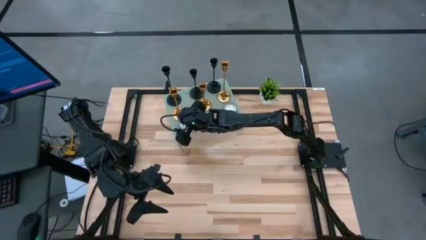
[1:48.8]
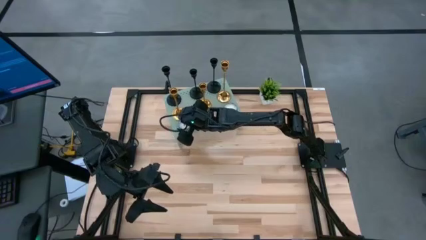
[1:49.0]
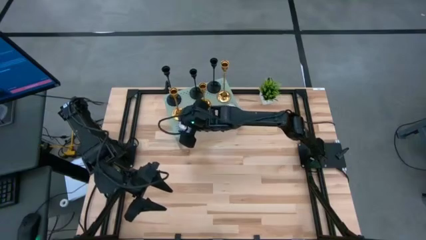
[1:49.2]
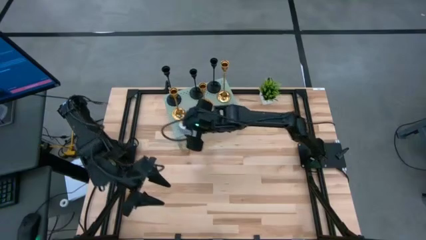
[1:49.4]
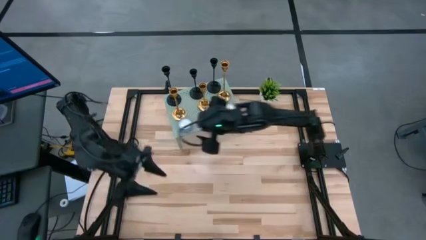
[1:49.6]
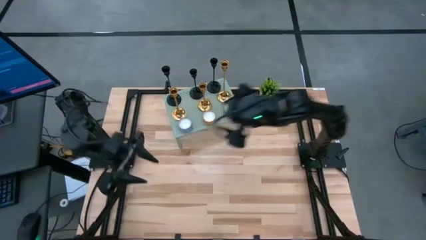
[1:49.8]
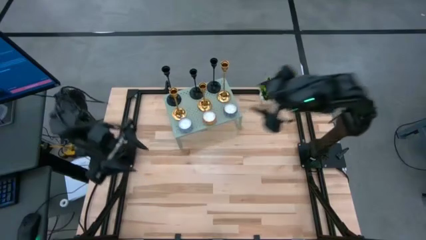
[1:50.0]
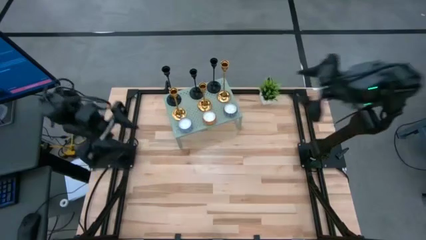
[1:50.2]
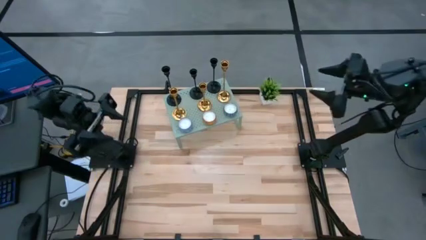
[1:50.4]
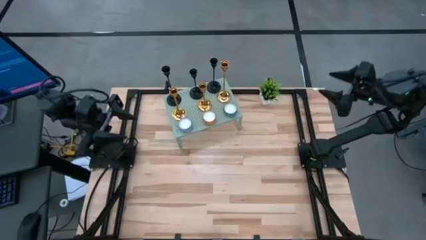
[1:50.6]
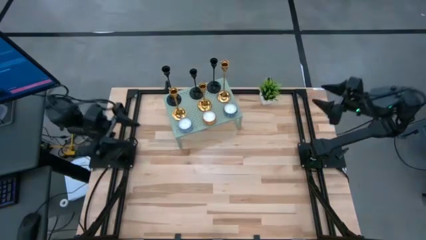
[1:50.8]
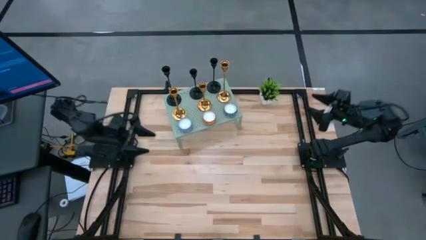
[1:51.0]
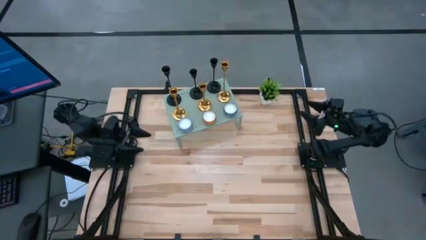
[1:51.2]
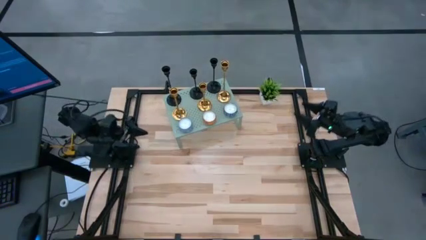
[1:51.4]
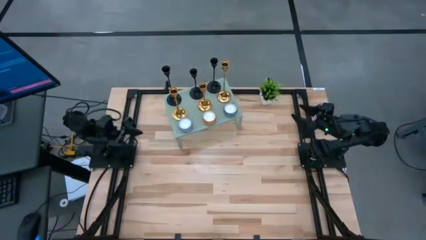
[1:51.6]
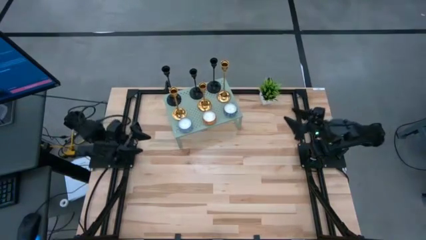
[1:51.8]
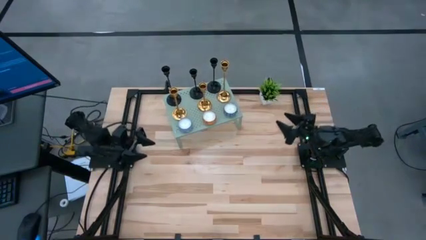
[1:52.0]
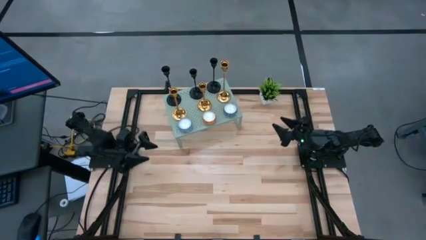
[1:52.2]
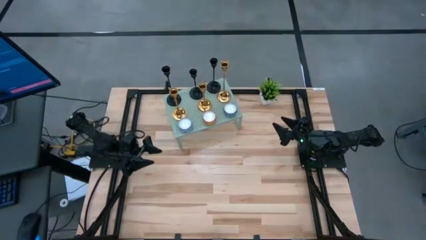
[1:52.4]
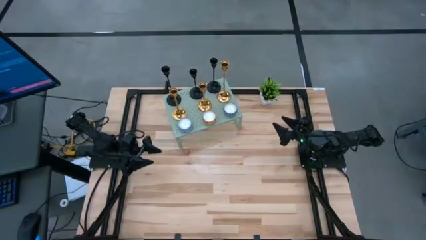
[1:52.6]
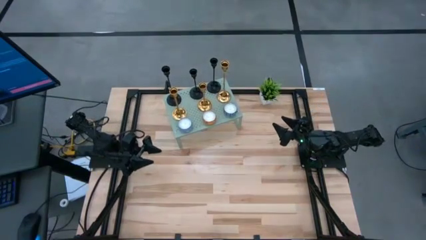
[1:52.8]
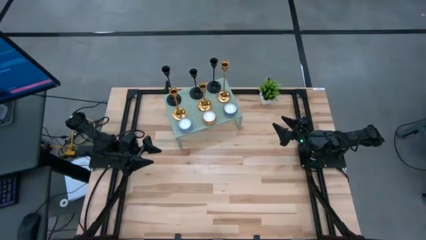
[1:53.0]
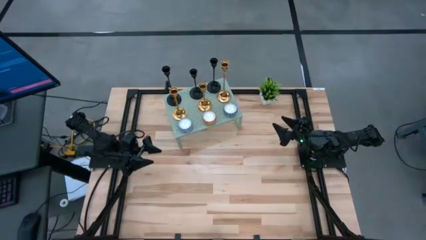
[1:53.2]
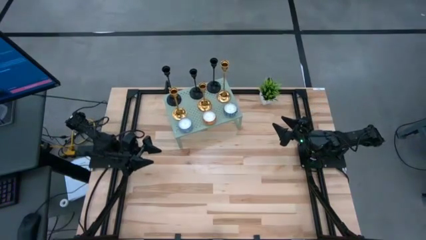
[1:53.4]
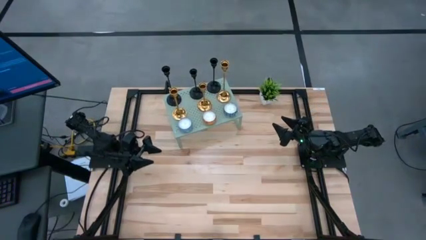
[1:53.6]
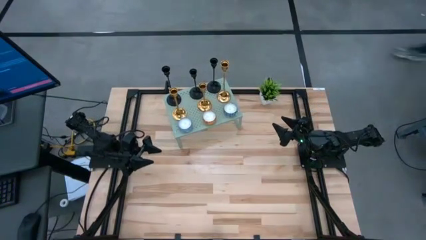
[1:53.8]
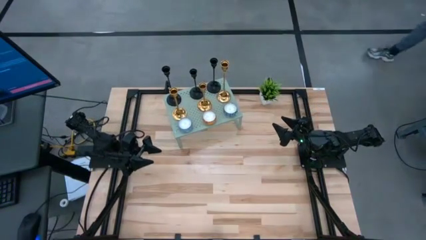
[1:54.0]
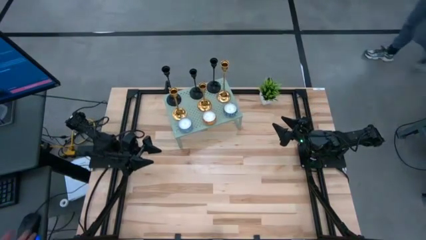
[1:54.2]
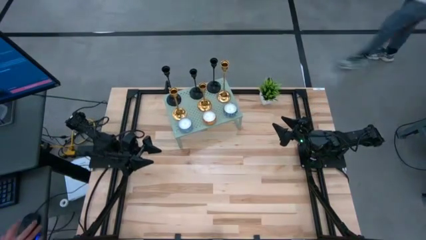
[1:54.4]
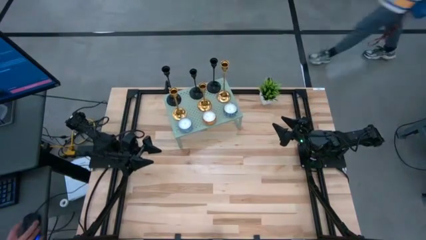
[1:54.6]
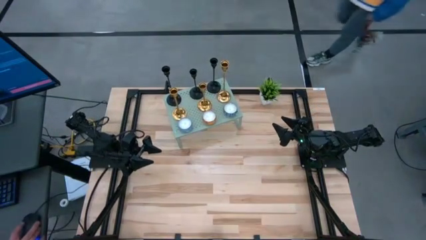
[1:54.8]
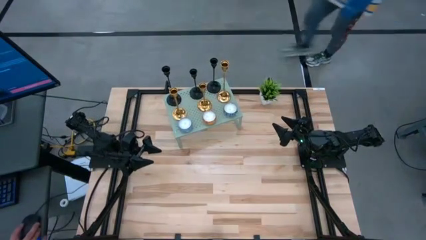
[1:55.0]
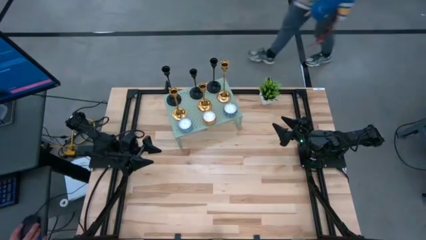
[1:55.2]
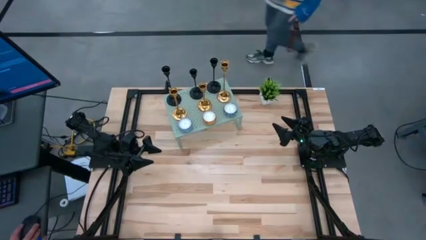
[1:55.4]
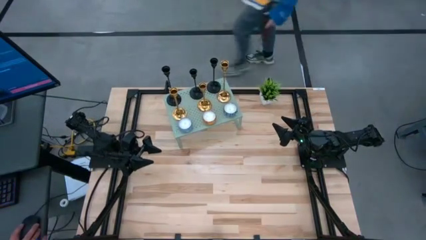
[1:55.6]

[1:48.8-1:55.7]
Task: Pick & Place candle stick holders
Return to Home Position

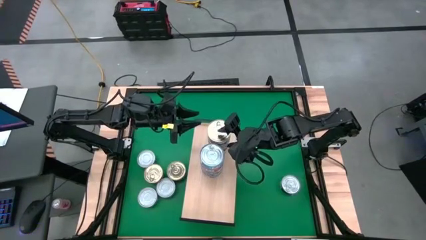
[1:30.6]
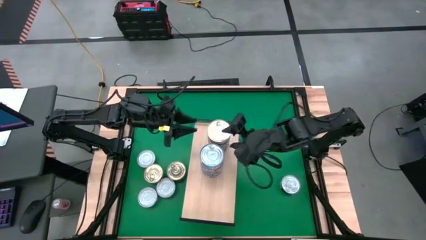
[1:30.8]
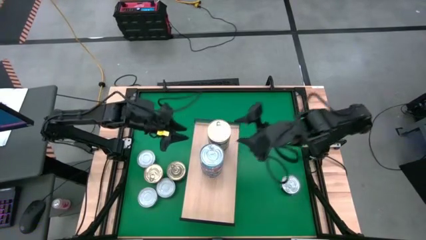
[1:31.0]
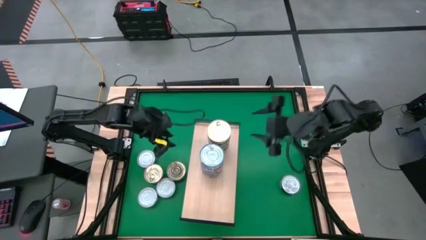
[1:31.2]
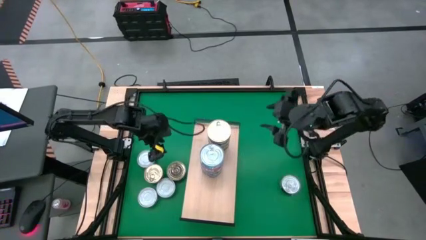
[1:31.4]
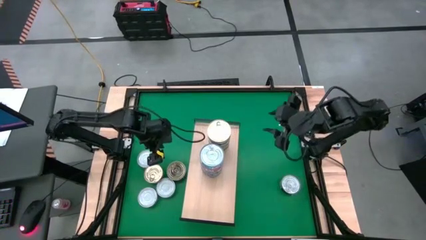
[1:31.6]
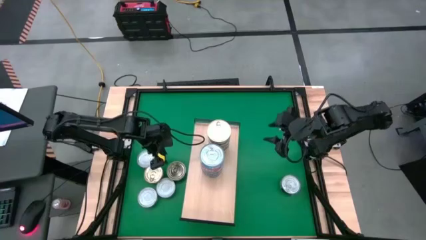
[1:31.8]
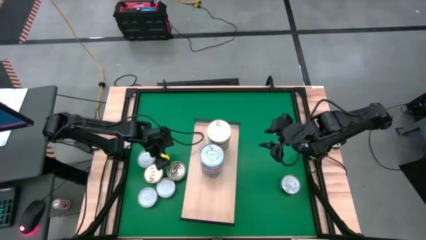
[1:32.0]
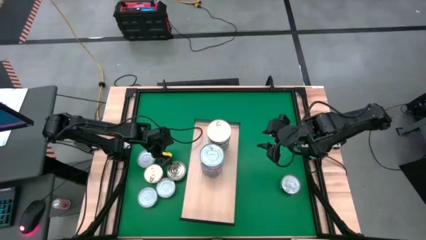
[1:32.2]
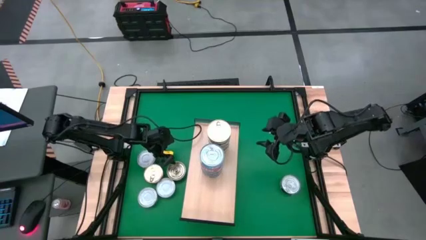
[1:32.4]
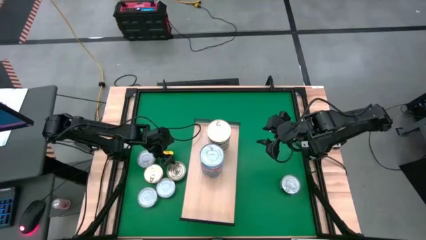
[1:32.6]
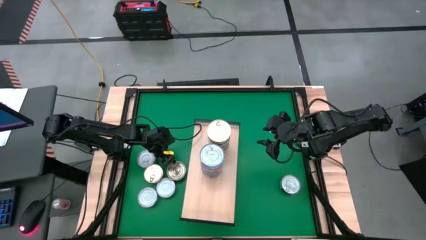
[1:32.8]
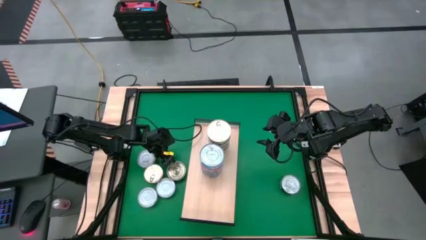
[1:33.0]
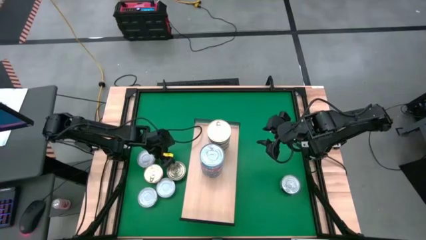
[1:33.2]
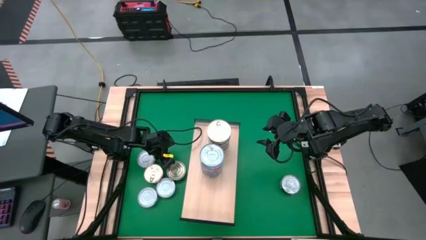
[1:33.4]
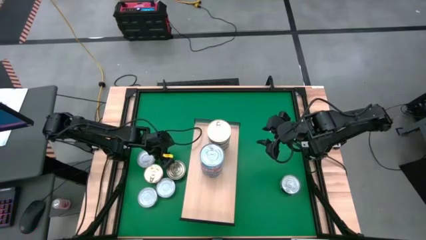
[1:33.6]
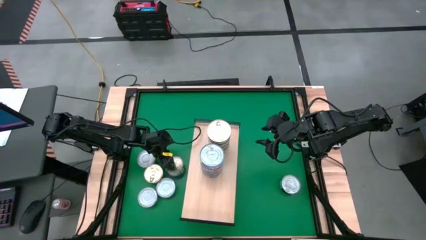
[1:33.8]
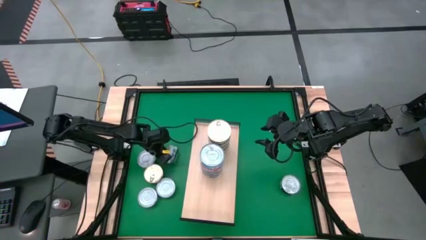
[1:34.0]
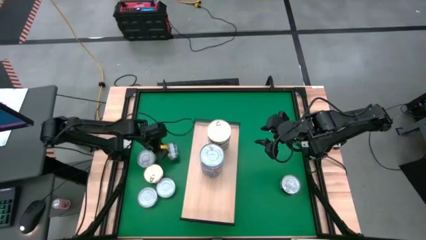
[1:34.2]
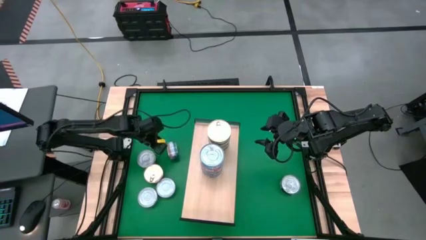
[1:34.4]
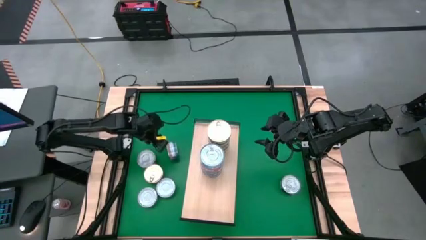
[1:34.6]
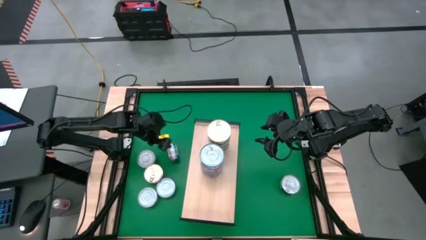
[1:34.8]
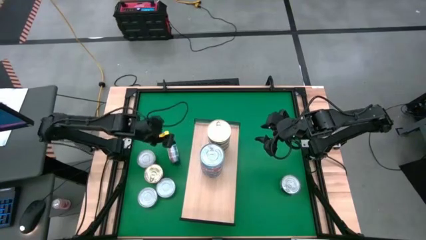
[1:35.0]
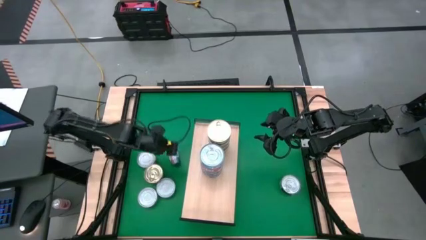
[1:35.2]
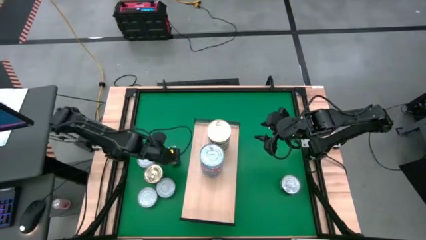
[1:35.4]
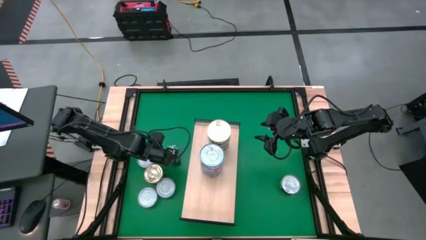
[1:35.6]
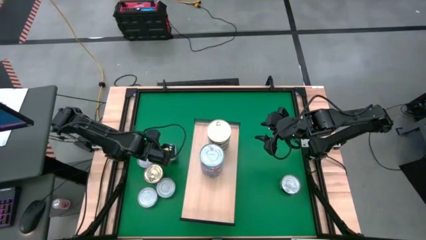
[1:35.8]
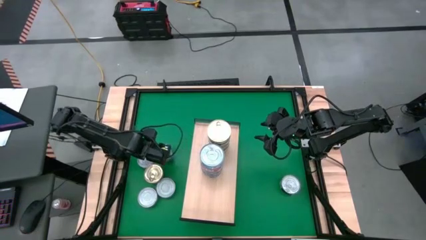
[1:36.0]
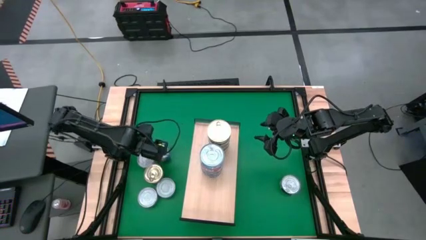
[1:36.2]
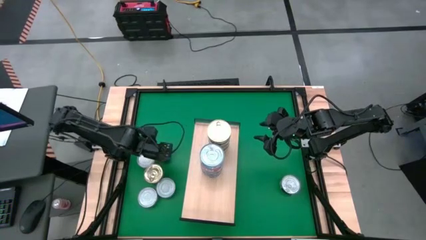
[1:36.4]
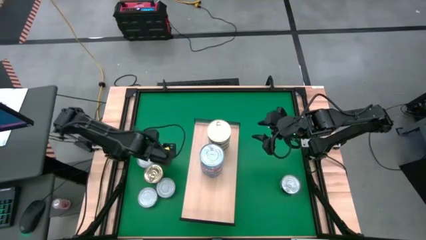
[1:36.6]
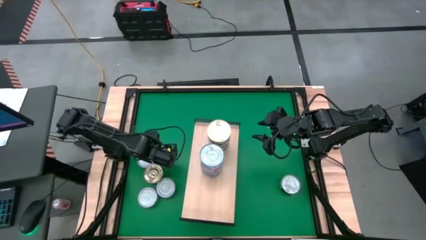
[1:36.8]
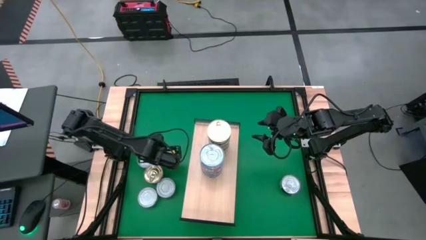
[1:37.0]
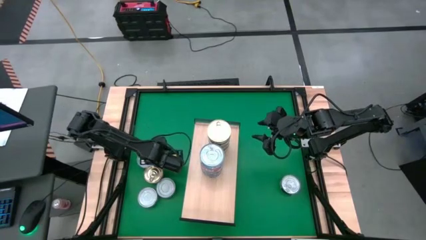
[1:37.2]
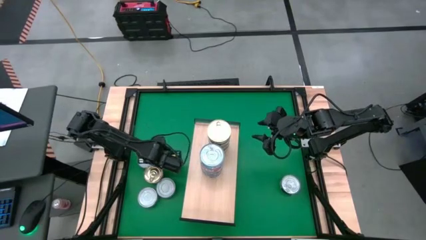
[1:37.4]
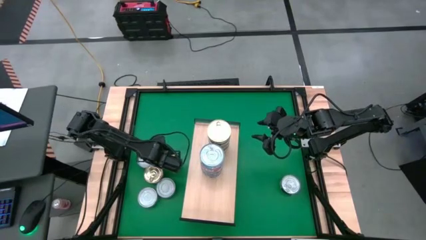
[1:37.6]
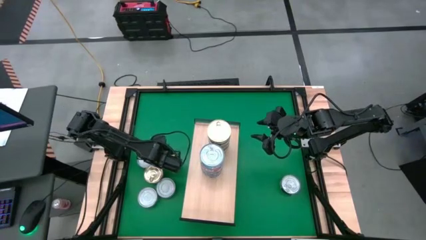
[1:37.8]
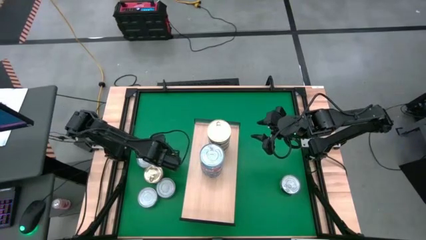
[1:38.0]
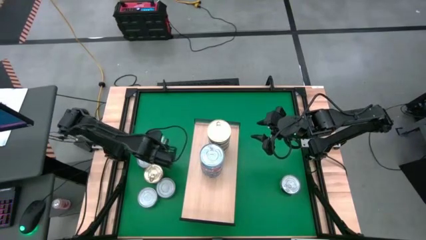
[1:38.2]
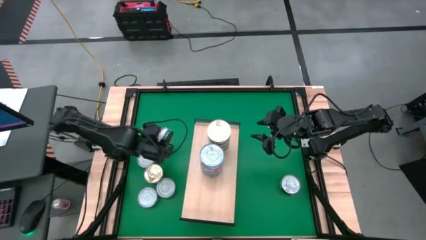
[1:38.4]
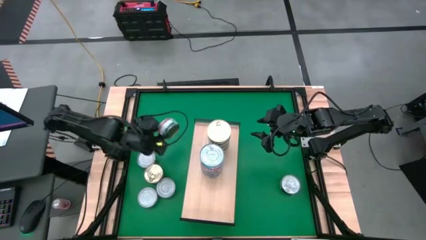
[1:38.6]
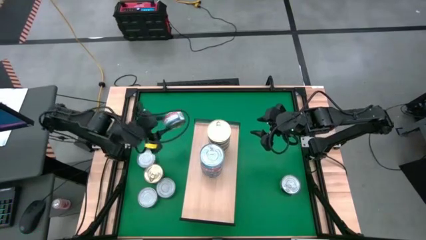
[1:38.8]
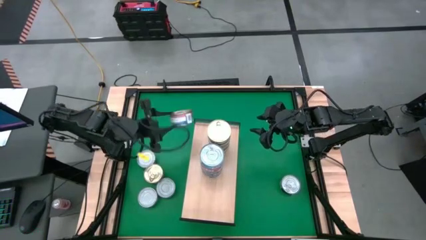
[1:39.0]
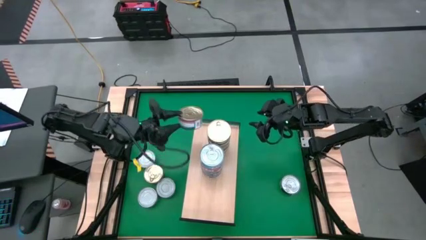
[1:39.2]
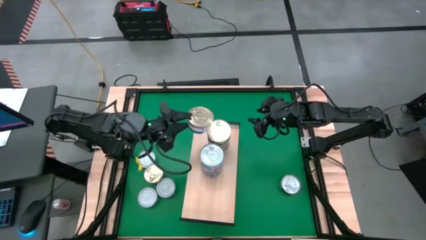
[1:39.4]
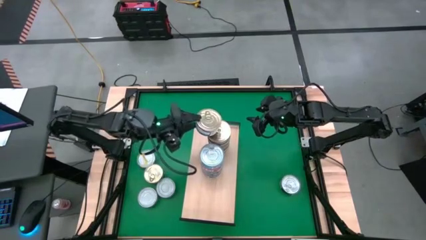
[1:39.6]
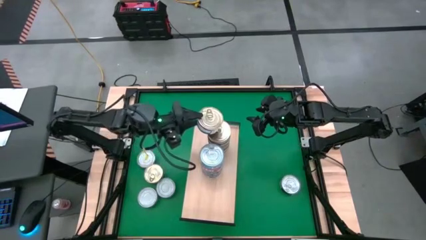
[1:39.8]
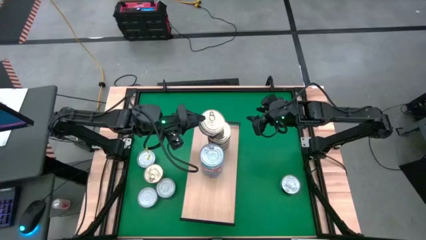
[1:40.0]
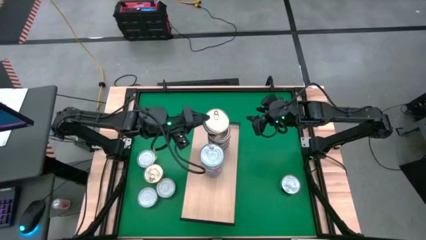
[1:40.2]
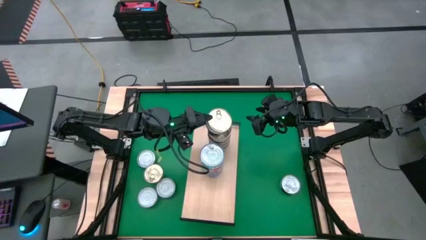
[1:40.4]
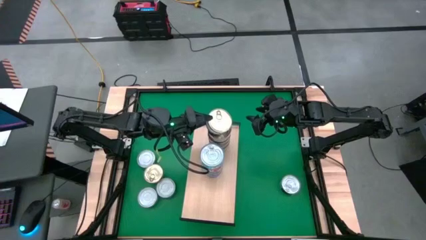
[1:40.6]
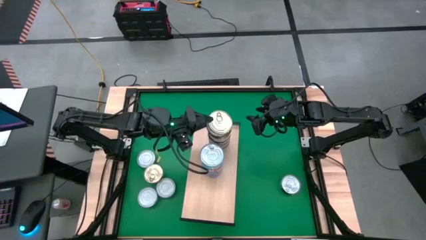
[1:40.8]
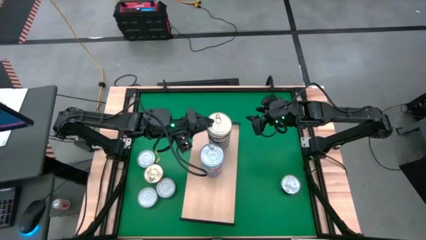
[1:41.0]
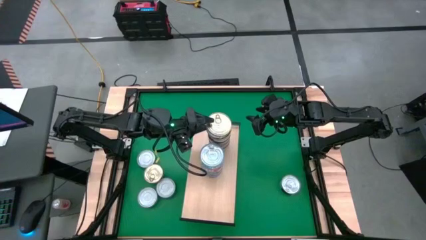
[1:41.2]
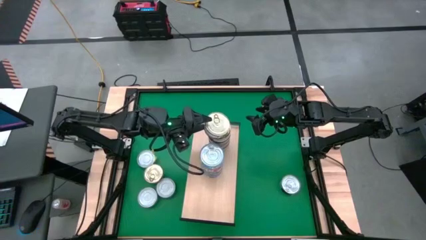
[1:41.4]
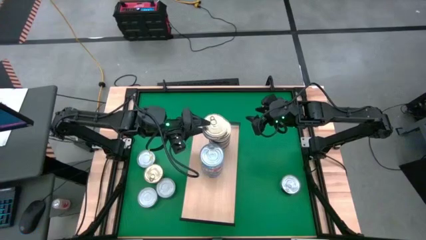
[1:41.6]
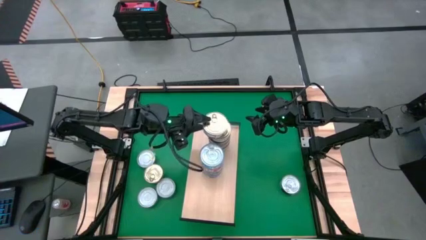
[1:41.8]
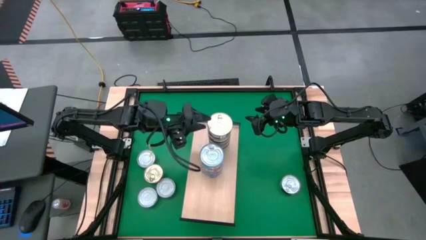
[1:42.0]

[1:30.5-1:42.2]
Task: Stack canned seafood by type on shelf
Stack the blue pink tuna can on top of the other blue pink tuna cans on the shelf
